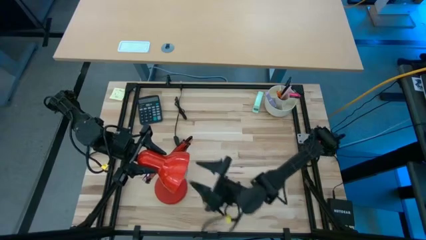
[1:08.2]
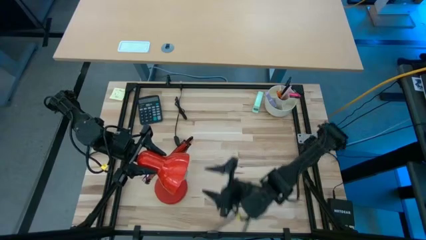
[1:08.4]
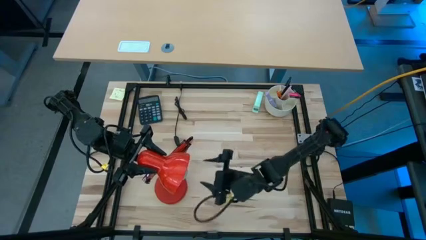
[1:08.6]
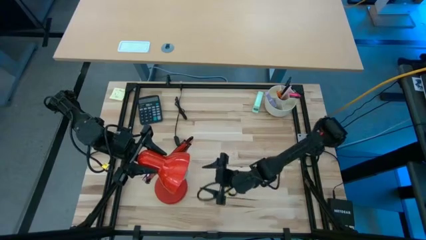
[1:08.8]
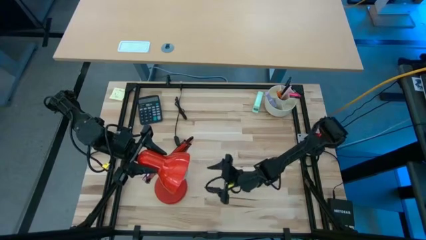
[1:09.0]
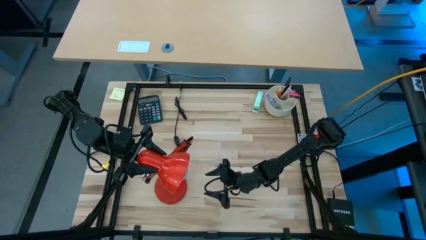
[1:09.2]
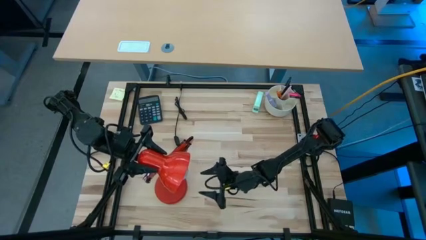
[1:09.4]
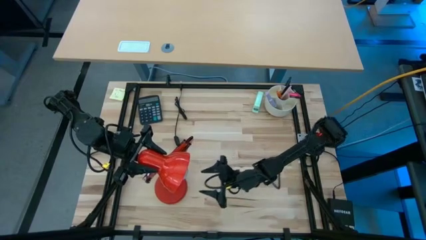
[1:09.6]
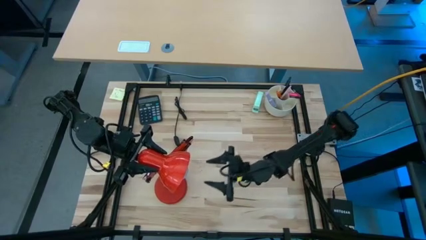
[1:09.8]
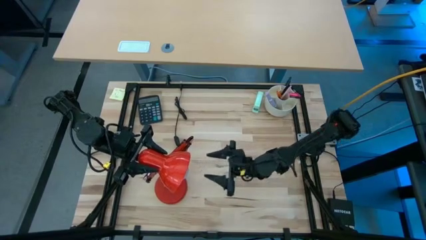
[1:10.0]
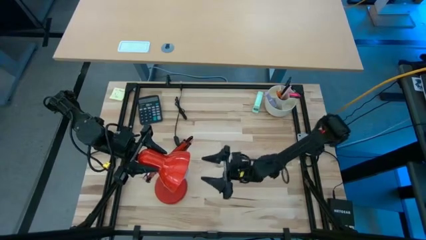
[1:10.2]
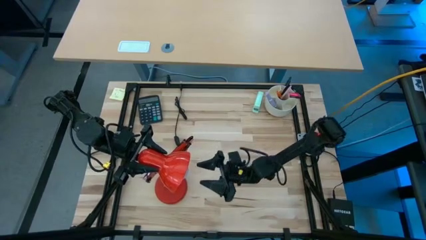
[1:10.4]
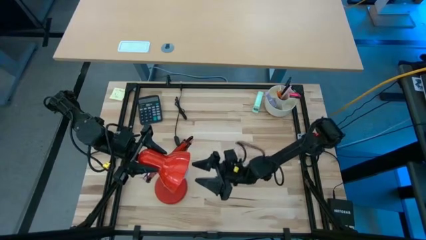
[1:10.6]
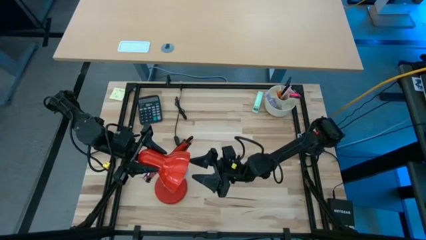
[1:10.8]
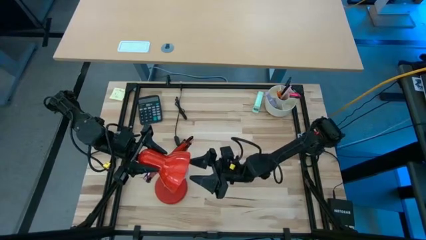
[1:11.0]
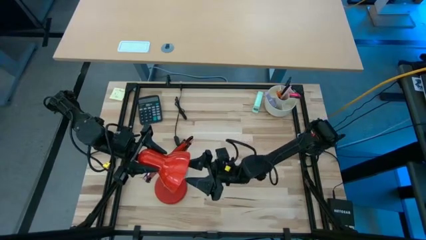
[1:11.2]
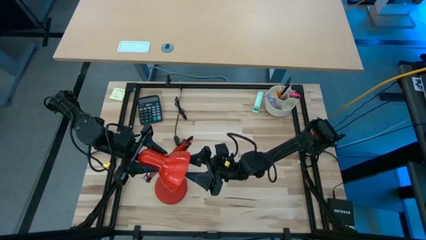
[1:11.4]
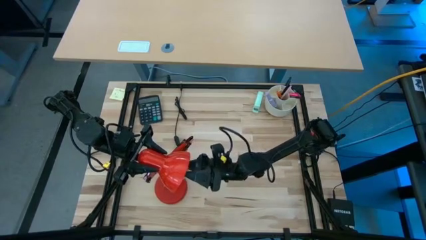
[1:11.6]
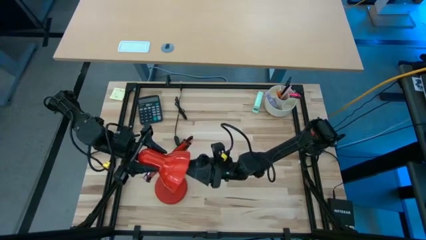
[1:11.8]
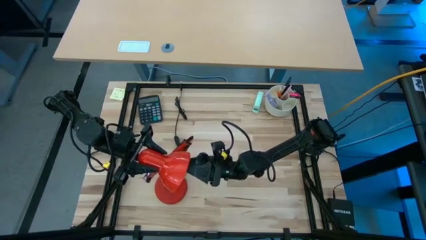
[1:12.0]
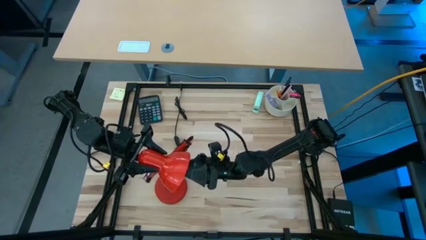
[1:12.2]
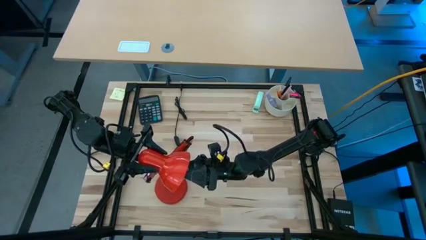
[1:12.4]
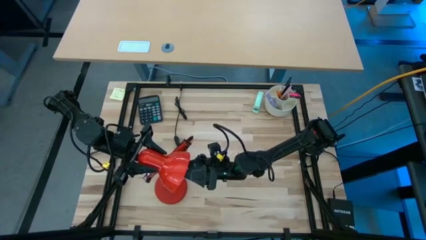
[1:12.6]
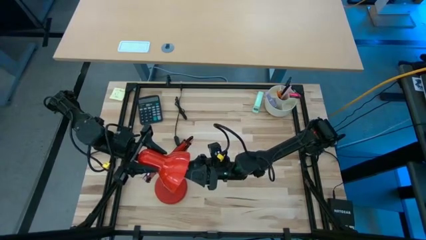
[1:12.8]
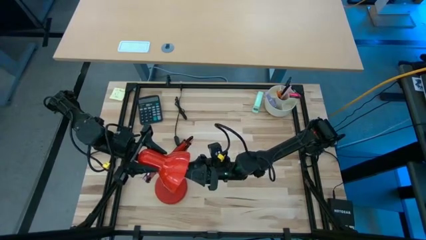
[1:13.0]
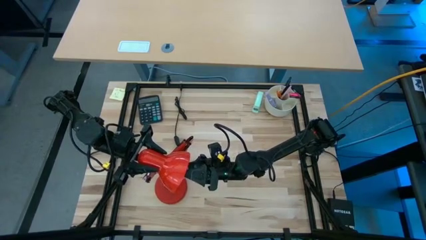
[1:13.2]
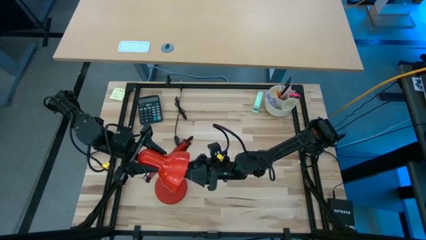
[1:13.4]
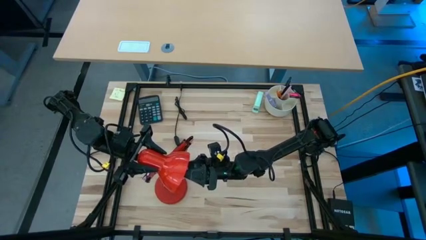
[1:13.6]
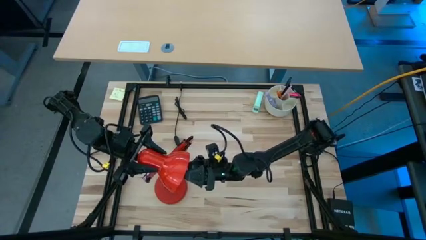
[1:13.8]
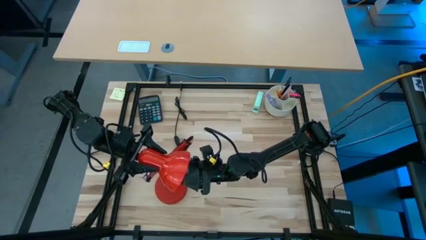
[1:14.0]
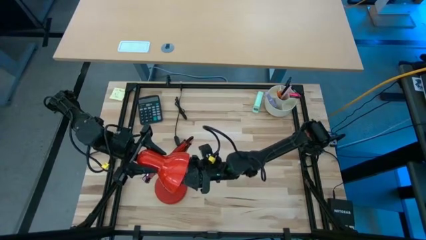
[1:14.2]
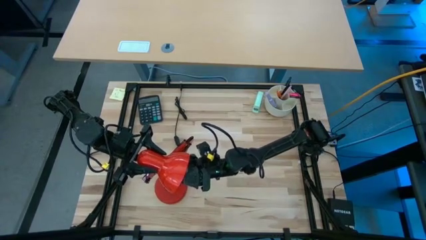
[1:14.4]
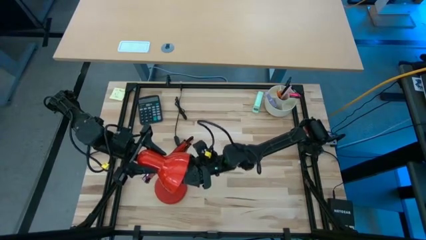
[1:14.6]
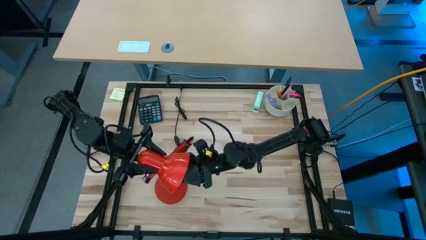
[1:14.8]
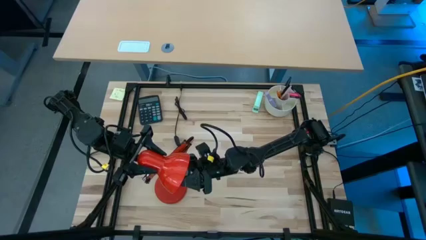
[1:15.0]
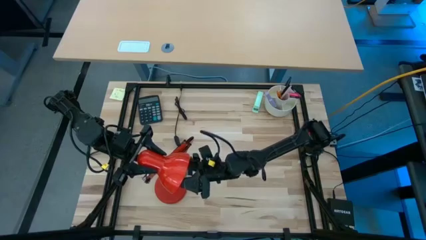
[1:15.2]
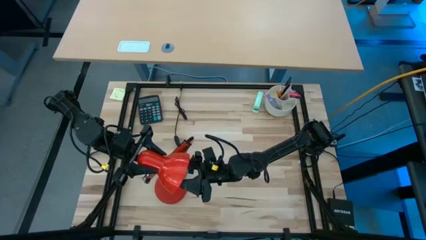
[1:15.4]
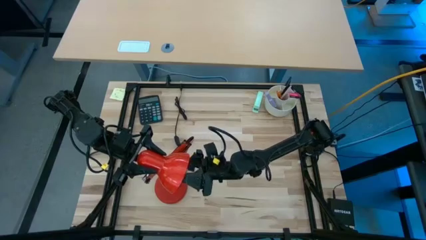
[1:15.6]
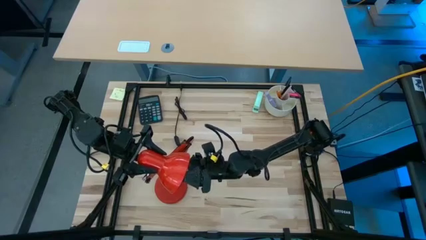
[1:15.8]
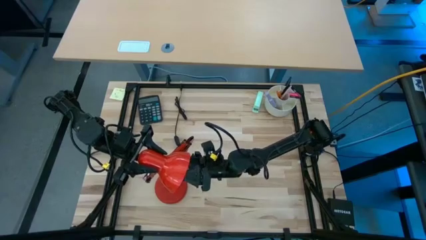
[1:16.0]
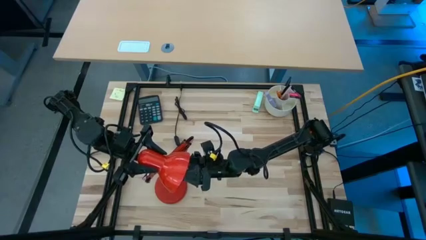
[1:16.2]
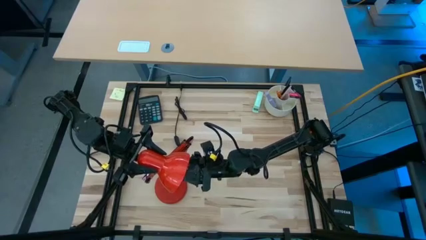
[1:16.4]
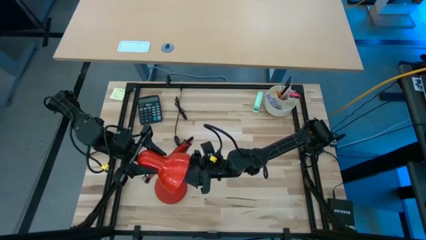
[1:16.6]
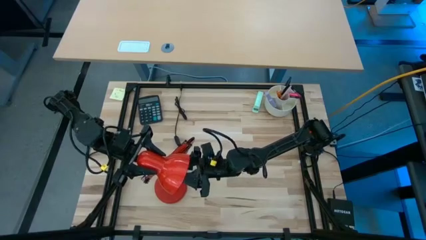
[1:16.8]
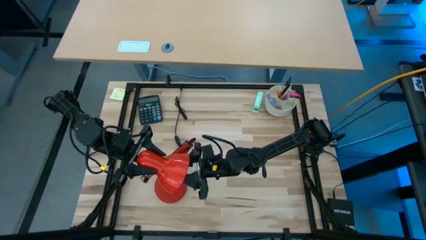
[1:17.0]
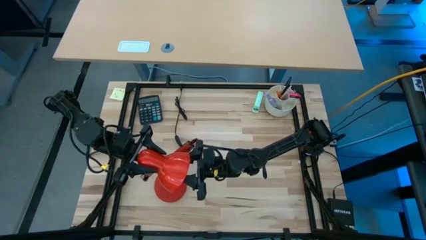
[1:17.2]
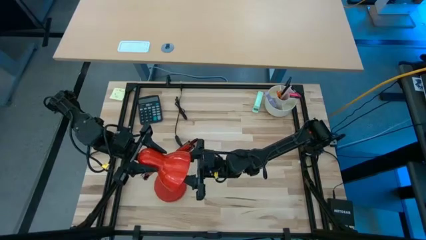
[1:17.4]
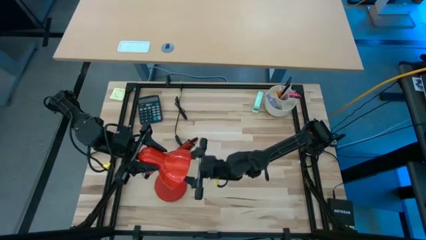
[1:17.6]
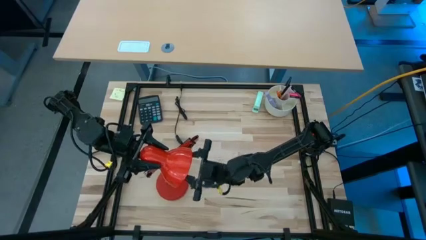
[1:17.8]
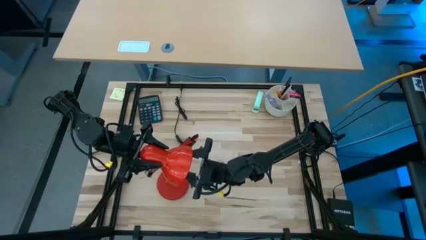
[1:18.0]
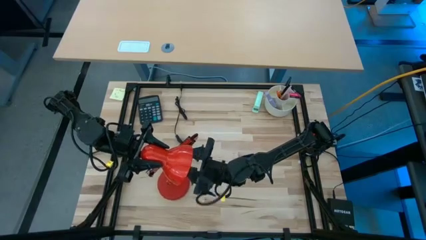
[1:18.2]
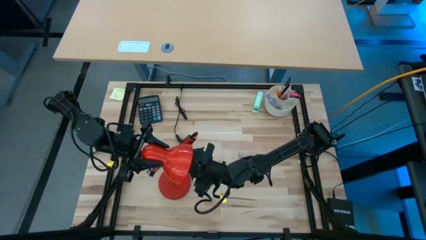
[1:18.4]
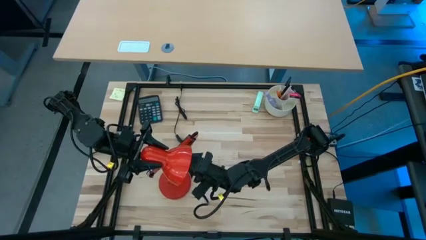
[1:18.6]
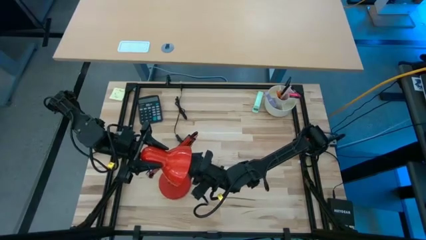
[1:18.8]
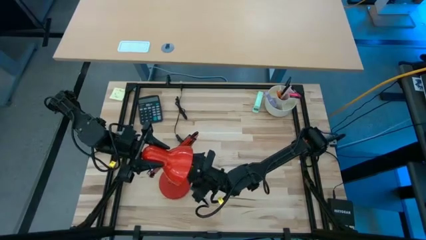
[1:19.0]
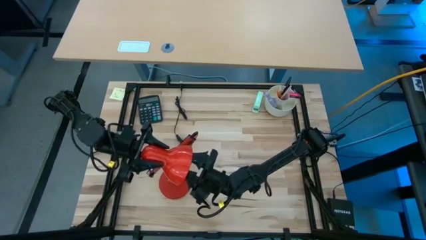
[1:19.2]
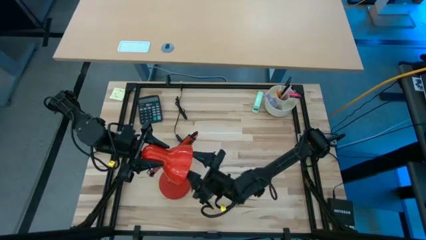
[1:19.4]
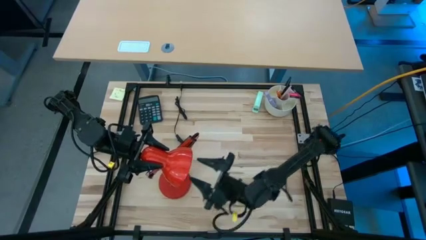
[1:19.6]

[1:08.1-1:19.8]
Task: Screw lightbulb
Remove the light bulb from orange desk lamp
